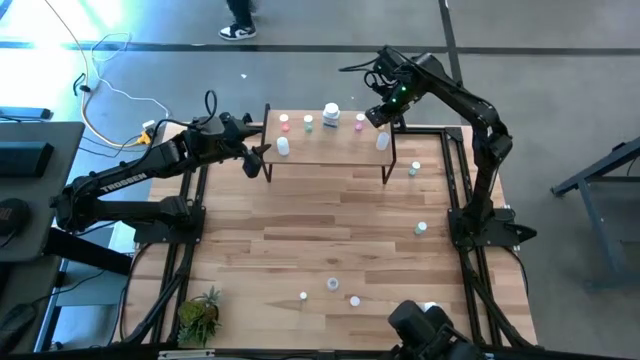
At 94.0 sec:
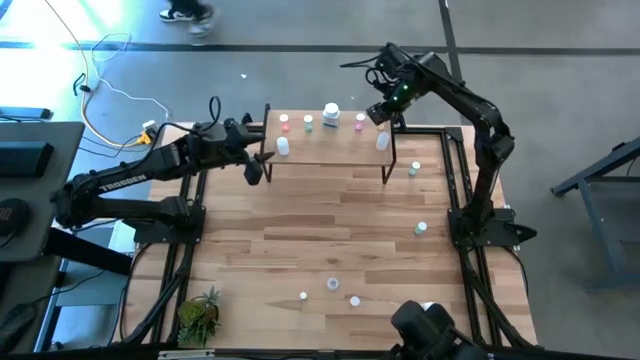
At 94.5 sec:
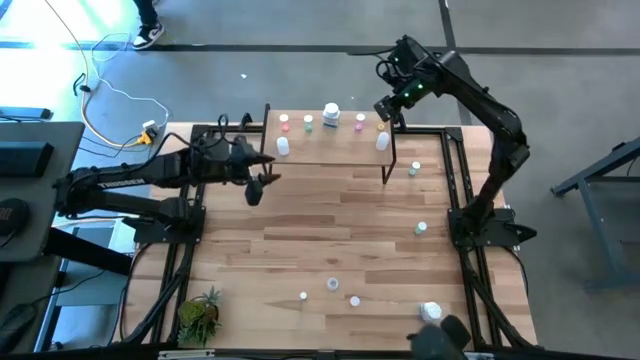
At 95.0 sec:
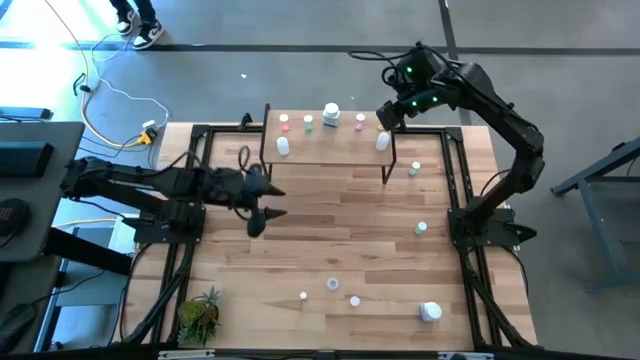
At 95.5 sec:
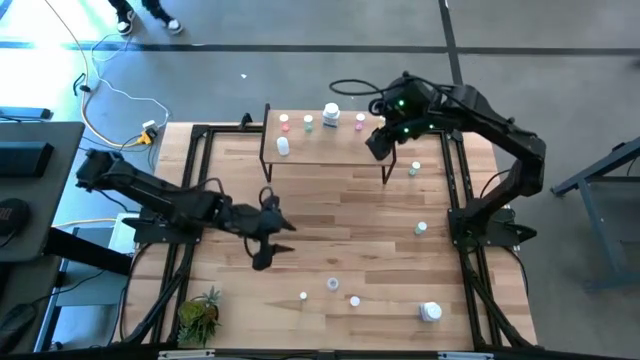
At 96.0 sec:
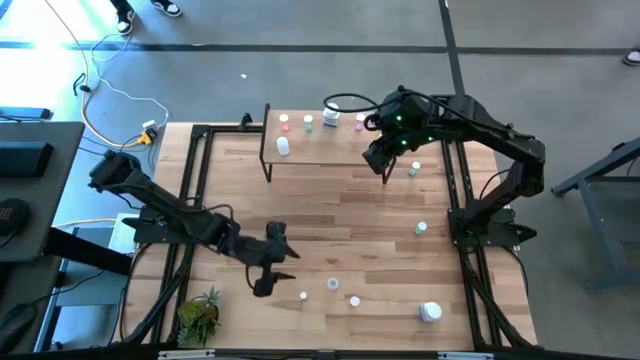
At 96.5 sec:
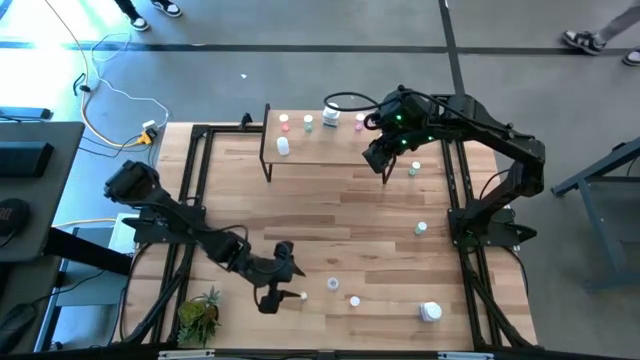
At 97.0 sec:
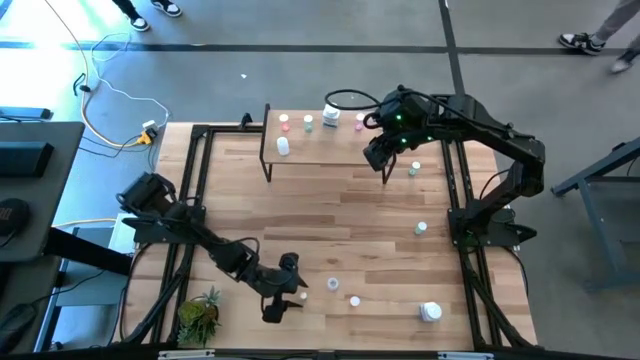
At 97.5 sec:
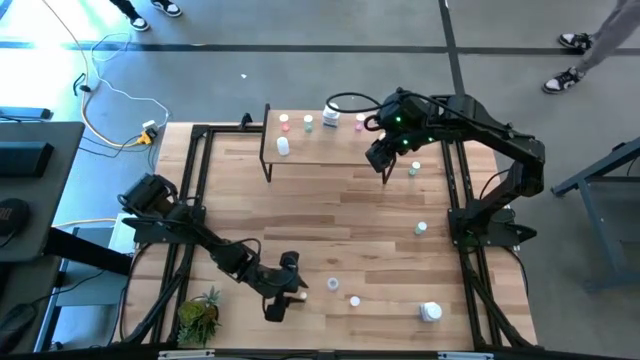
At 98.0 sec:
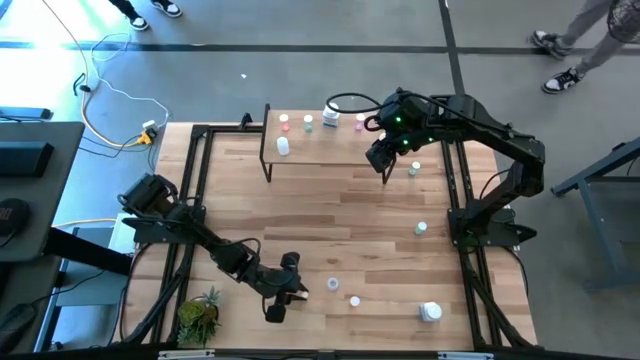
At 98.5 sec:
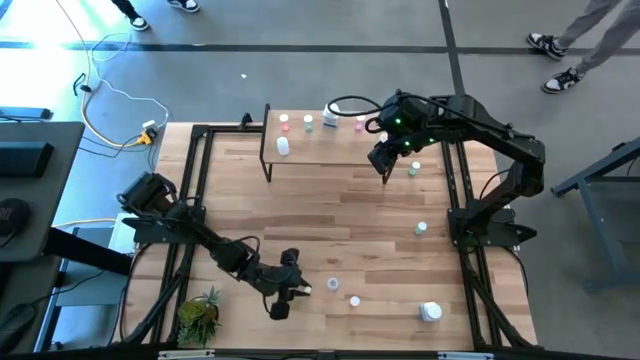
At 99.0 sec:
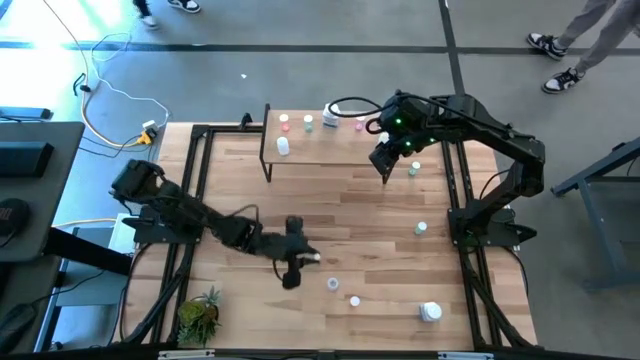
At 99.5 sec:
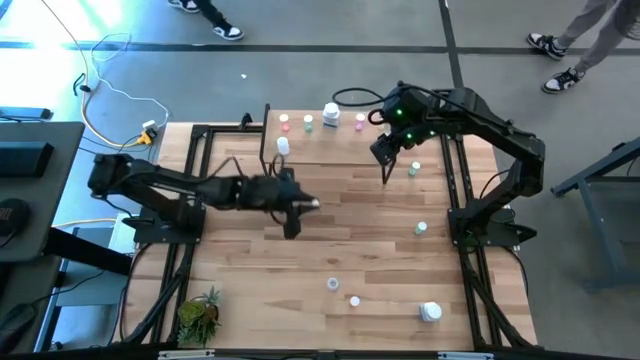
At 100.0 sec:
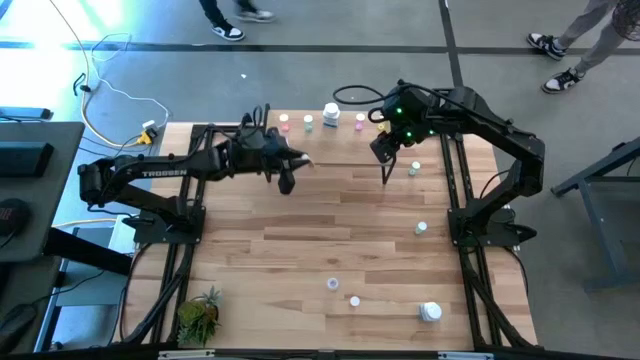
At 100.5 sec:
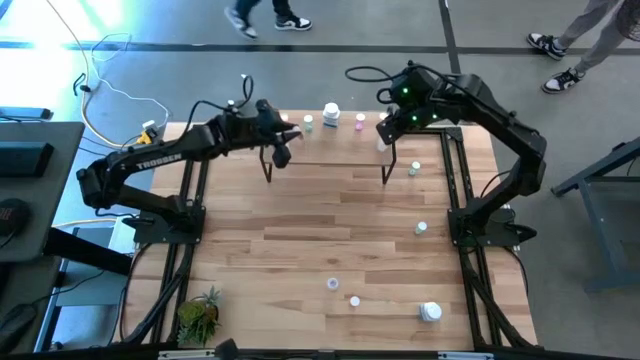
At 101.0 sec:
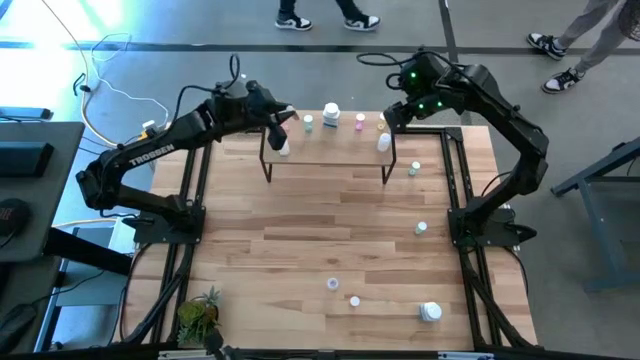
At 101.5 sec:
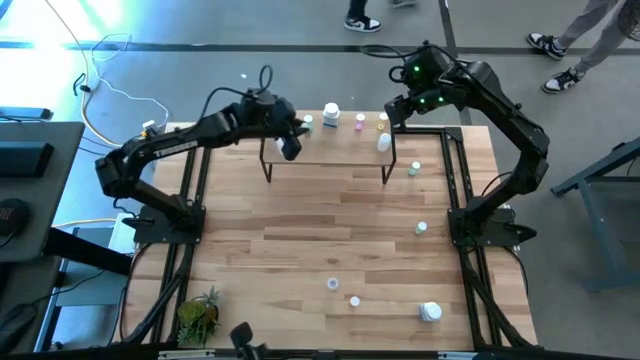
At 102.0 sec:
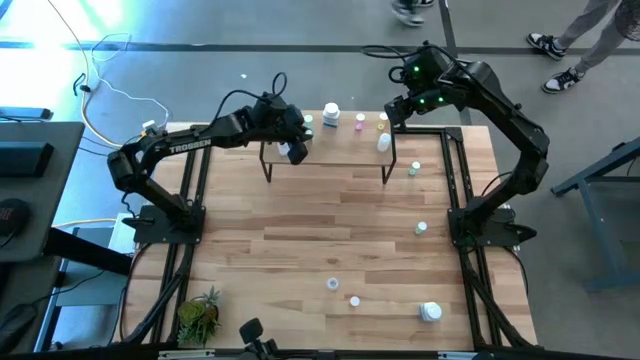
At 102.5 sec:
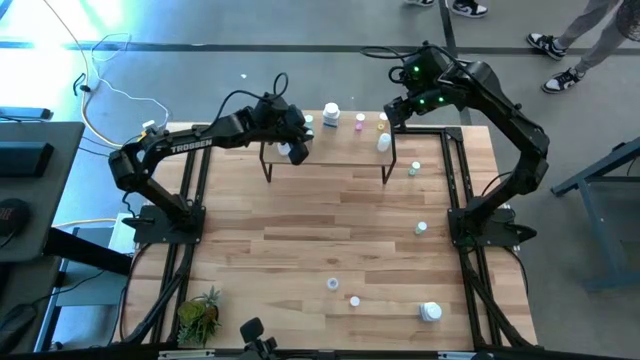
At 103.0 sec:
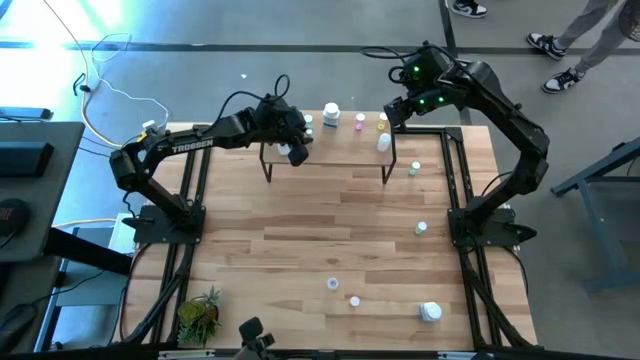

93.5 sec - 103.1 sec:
Task: Pick and place medicine bottles onto shelf by color
Put the white pill bottle on the shelf

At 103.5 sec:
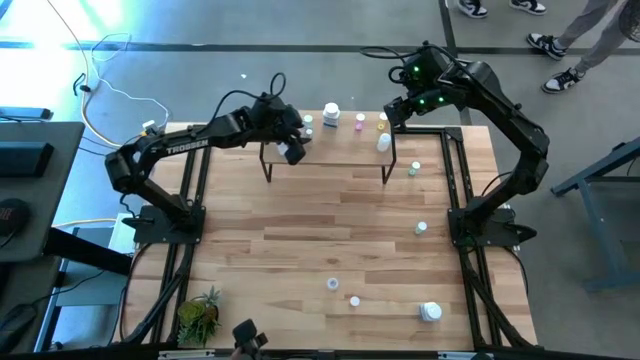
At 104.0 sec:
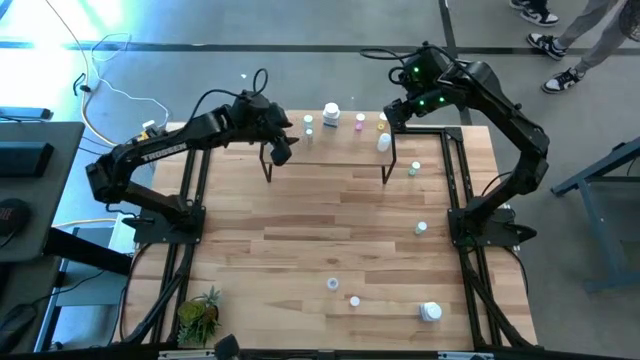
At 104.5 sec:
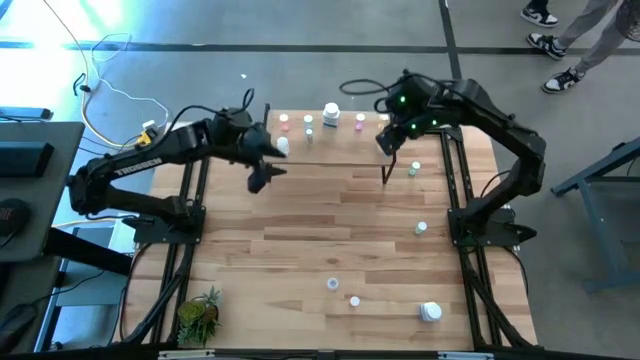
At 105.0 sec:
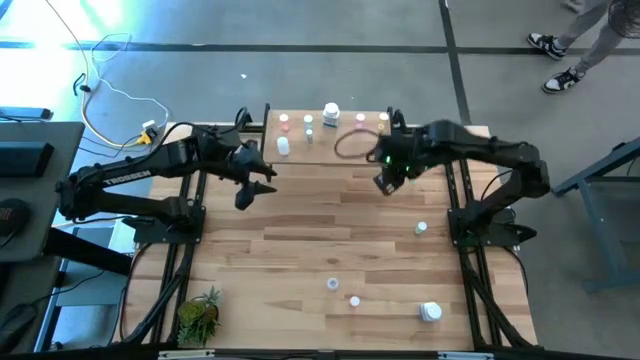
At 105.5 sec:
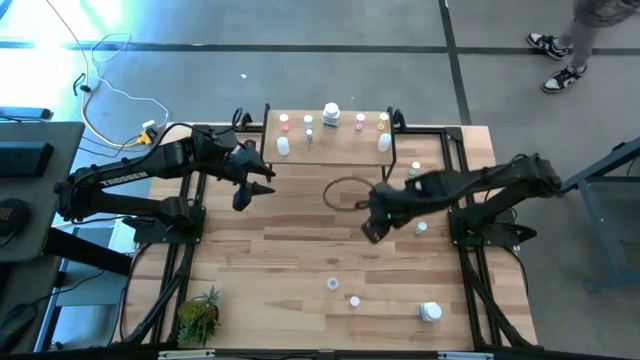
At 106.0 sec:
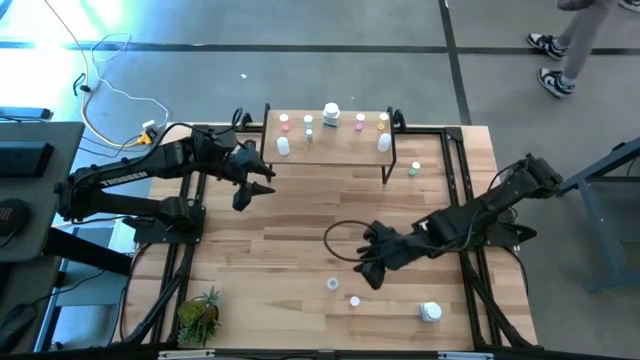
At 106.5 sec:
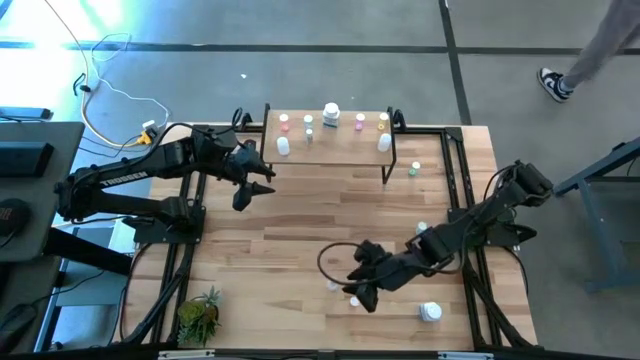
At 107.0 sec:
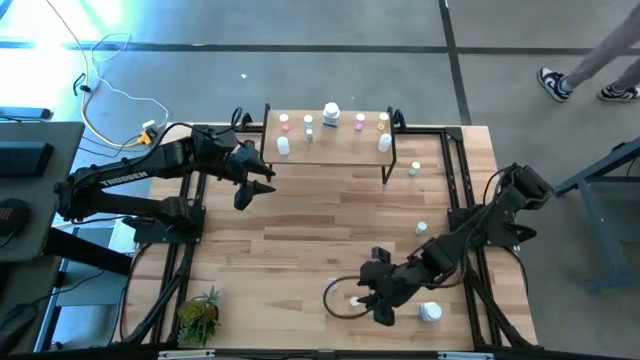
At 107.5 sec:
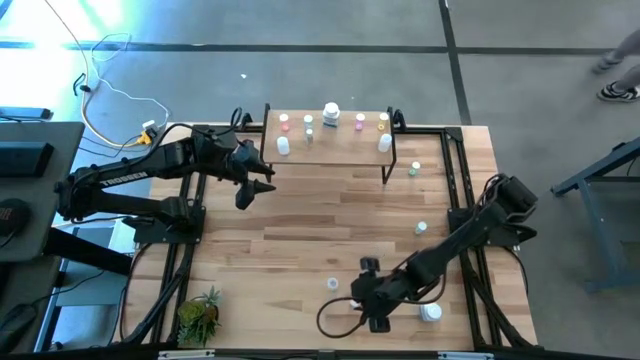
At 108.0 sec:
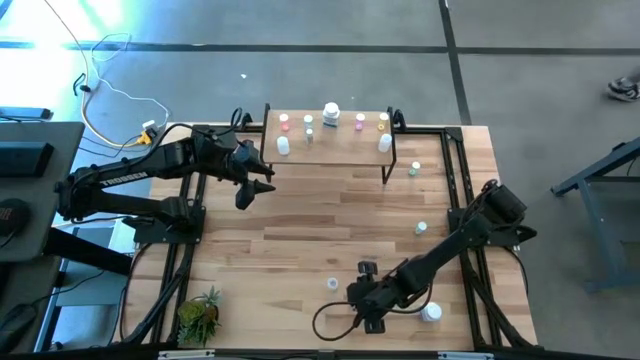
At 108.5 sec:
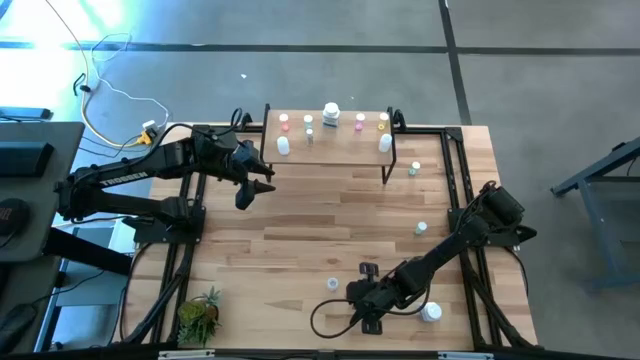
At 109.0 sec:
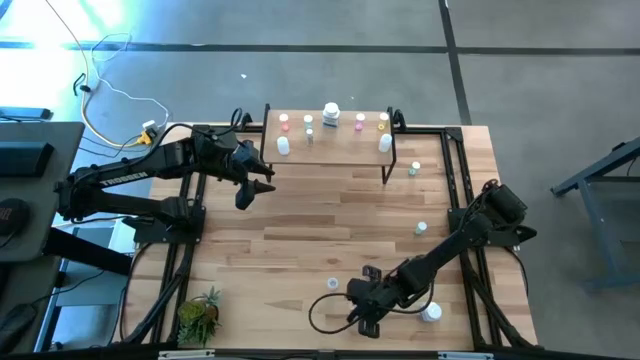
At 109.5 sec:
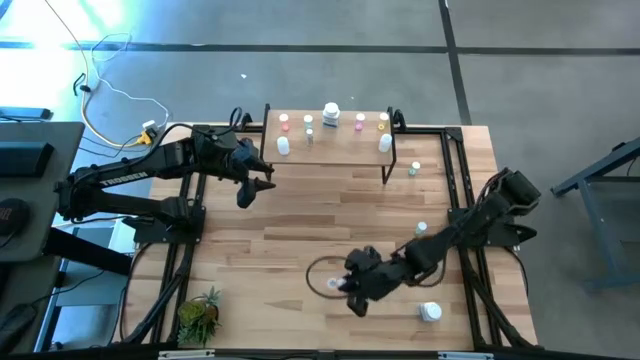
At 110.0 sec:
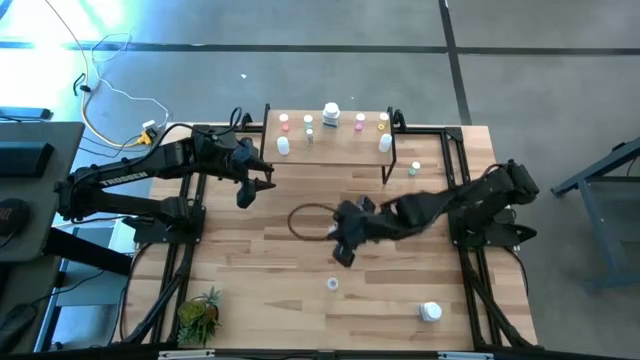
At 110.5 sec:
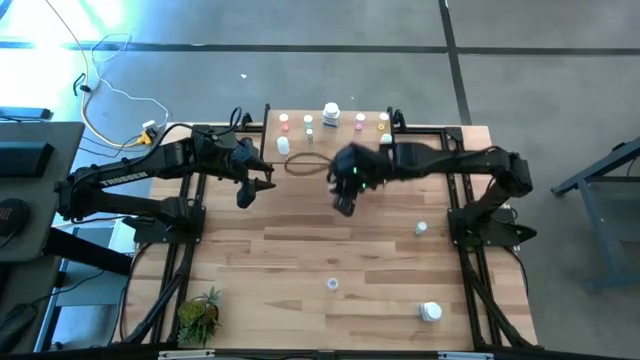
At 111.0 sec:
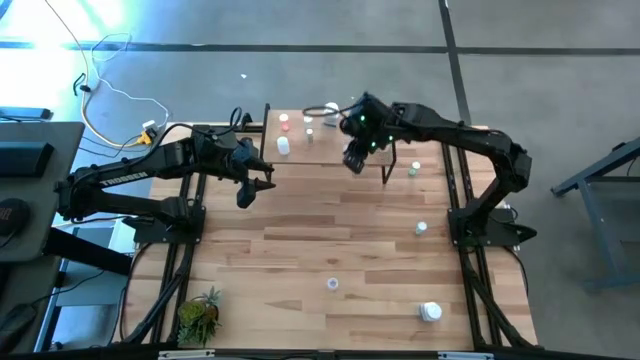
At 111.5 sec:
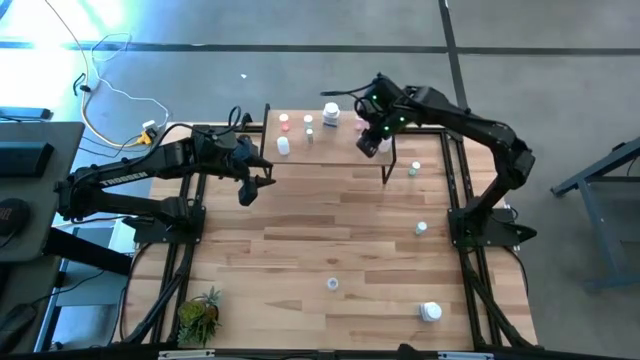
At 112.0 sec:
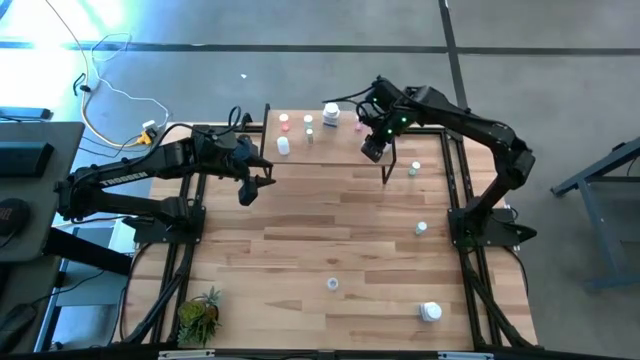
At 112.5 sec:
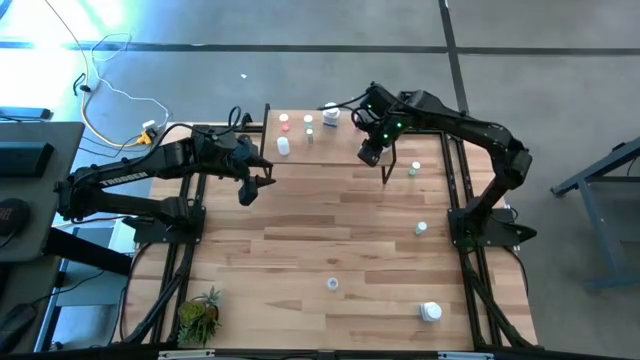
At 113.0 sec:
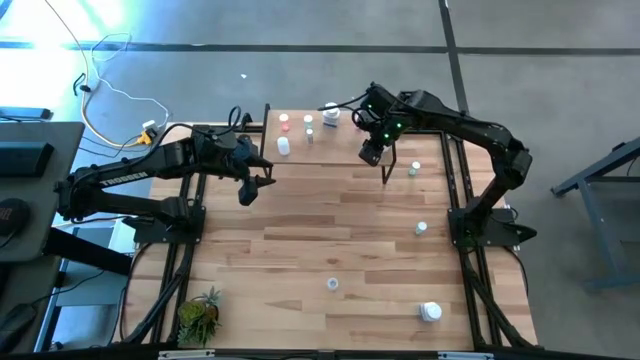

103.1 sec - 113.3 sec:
Put the orange pill bottle on the shelf
